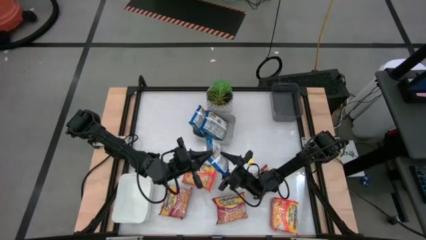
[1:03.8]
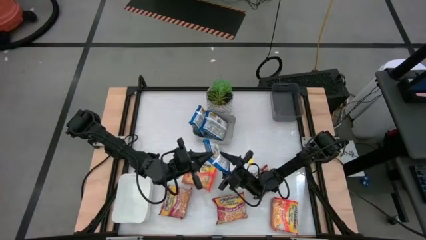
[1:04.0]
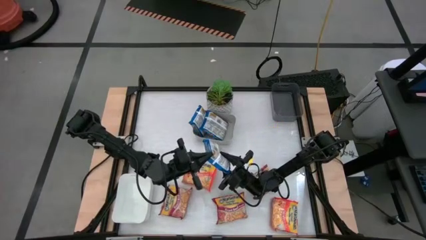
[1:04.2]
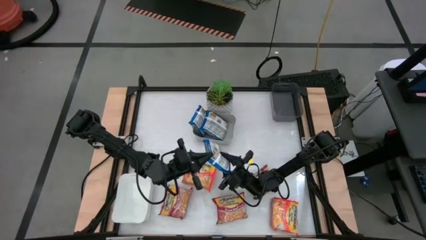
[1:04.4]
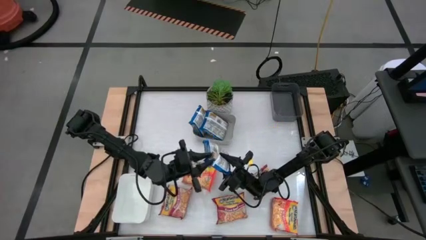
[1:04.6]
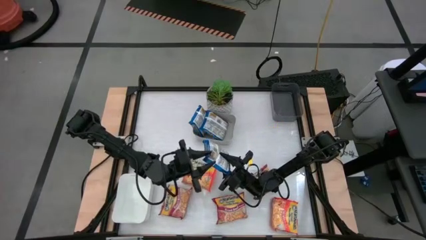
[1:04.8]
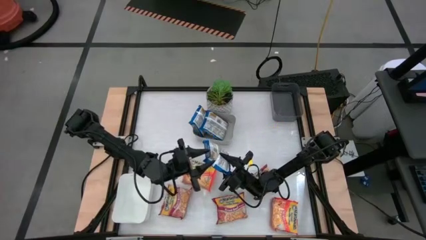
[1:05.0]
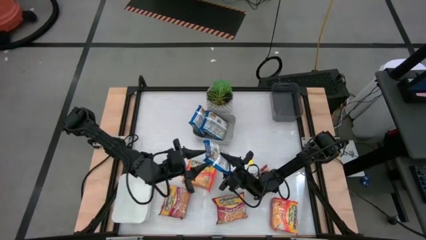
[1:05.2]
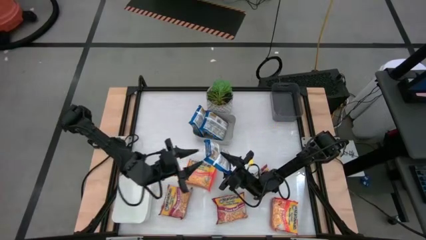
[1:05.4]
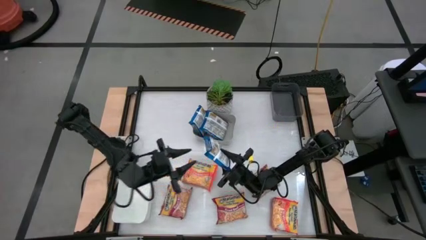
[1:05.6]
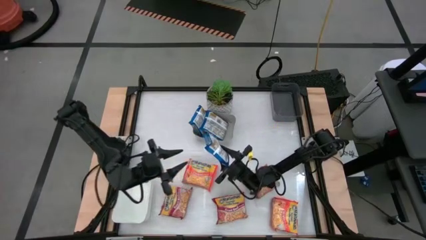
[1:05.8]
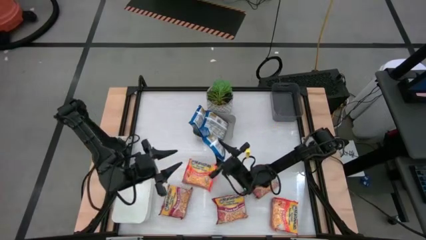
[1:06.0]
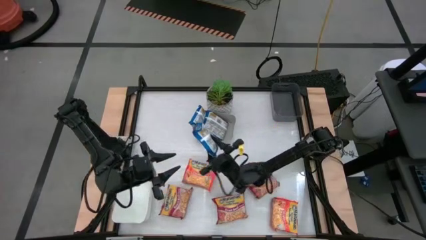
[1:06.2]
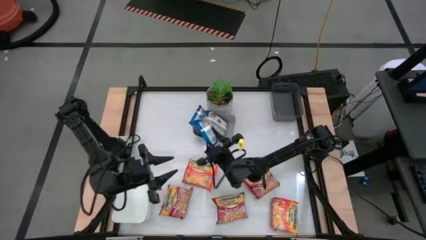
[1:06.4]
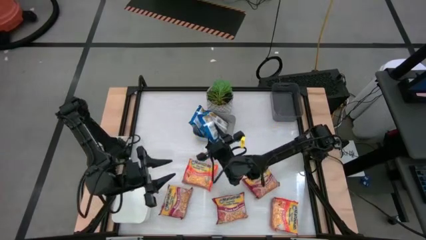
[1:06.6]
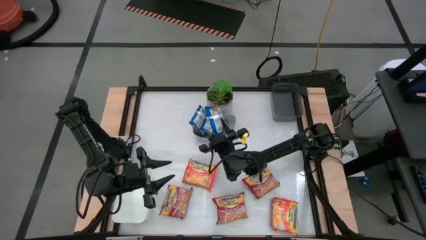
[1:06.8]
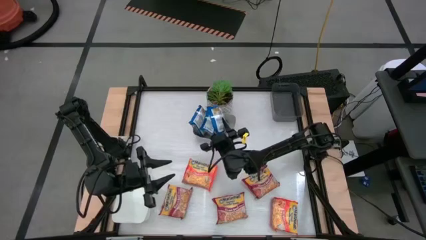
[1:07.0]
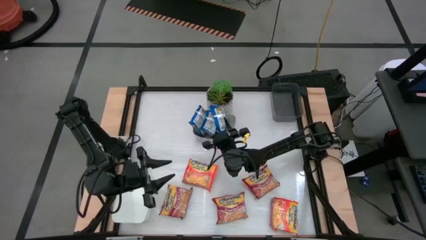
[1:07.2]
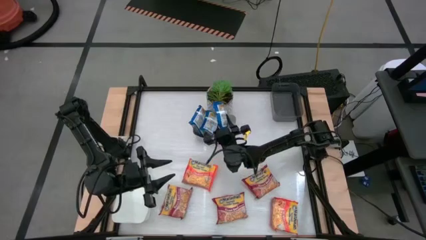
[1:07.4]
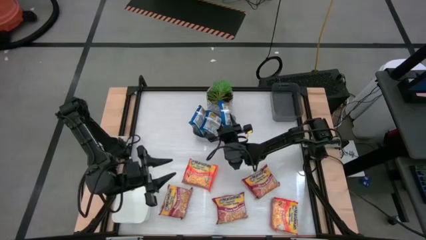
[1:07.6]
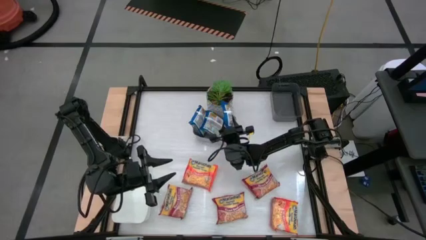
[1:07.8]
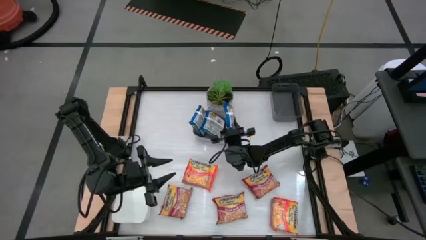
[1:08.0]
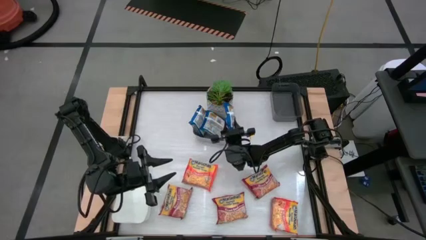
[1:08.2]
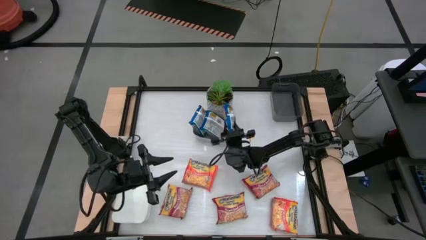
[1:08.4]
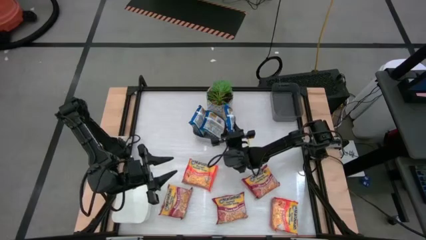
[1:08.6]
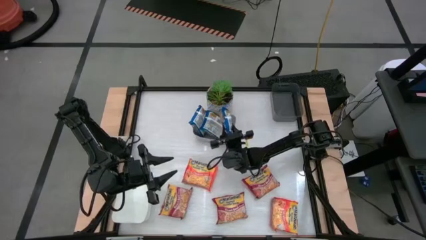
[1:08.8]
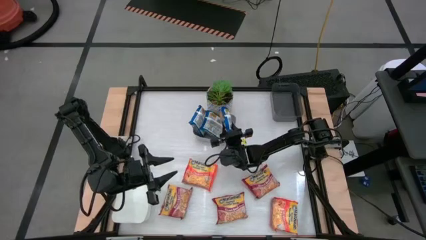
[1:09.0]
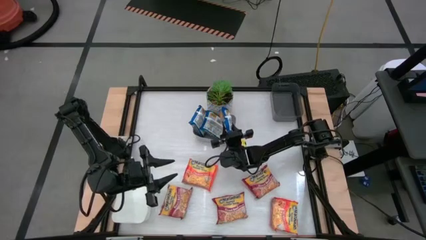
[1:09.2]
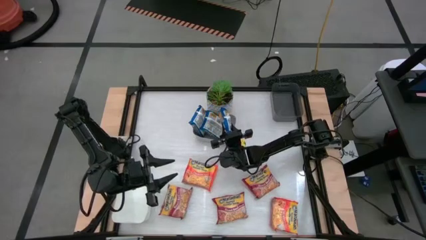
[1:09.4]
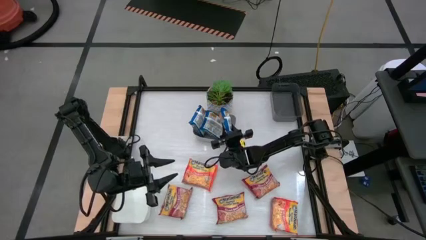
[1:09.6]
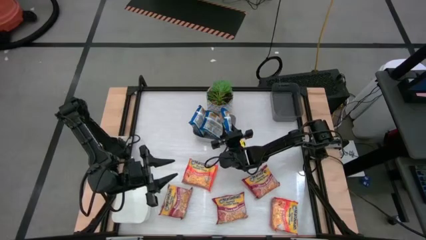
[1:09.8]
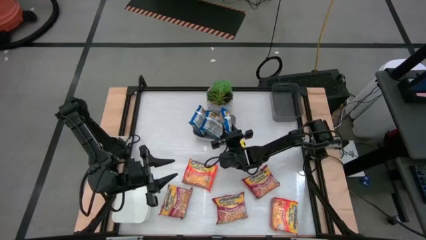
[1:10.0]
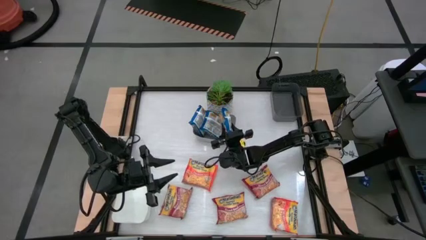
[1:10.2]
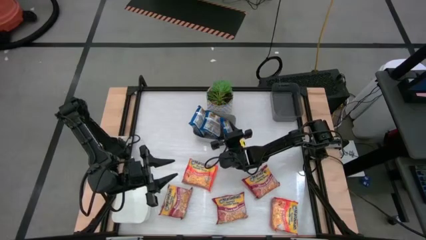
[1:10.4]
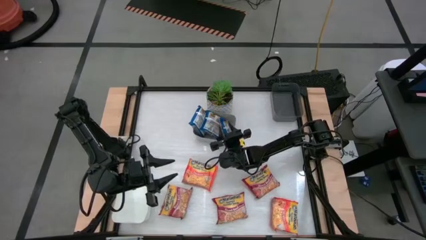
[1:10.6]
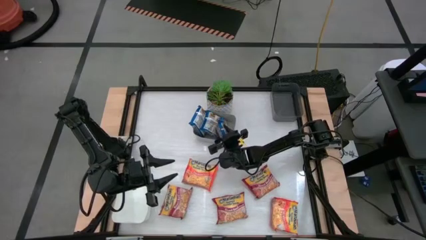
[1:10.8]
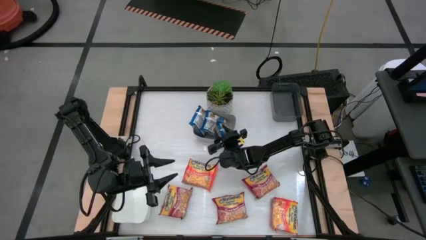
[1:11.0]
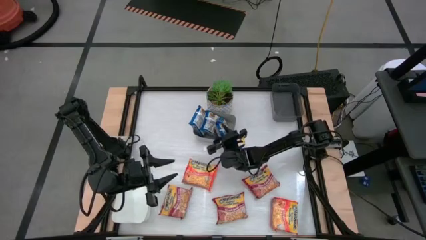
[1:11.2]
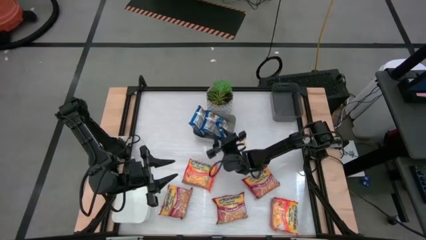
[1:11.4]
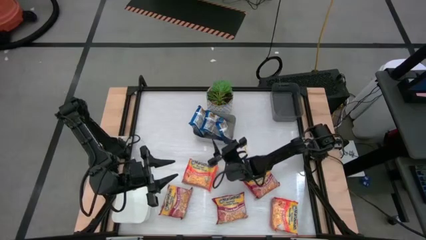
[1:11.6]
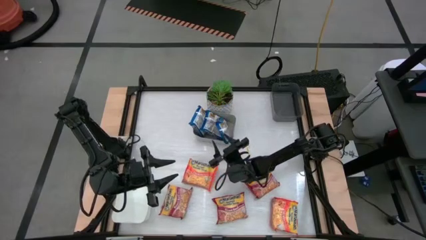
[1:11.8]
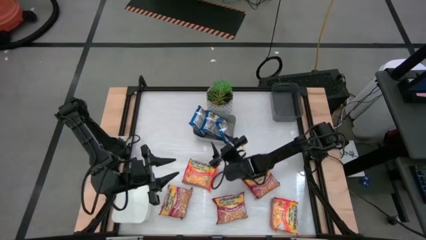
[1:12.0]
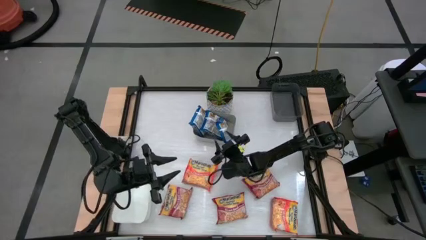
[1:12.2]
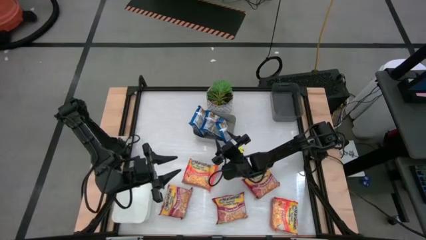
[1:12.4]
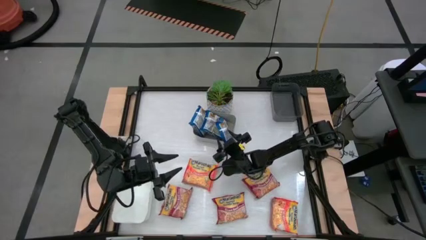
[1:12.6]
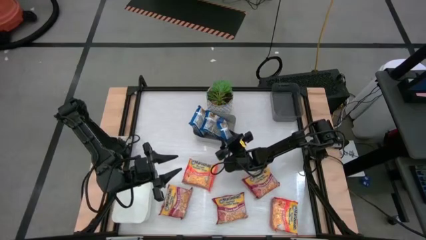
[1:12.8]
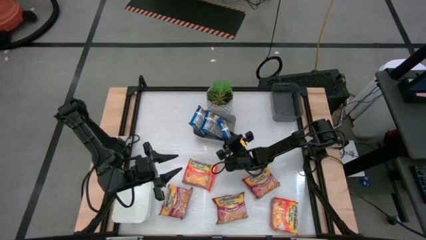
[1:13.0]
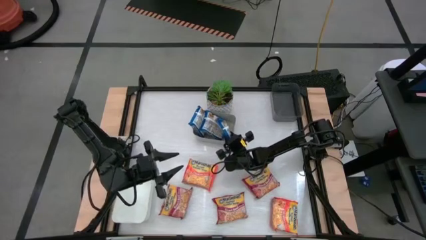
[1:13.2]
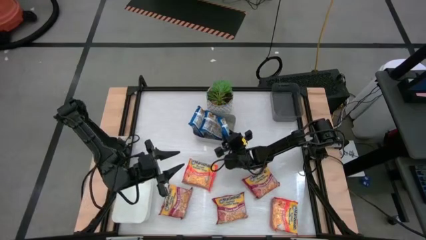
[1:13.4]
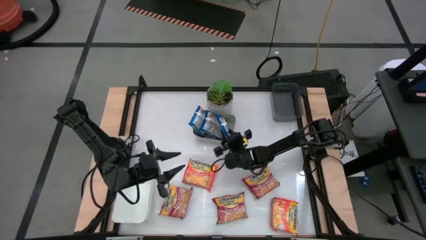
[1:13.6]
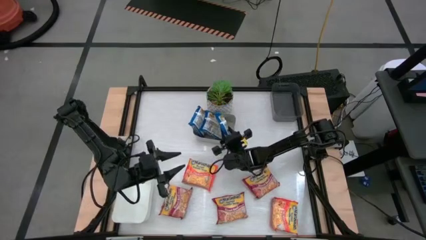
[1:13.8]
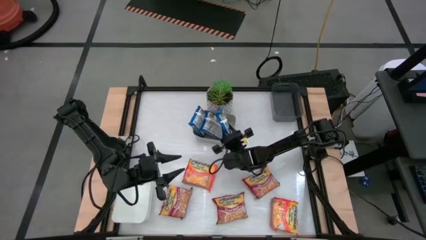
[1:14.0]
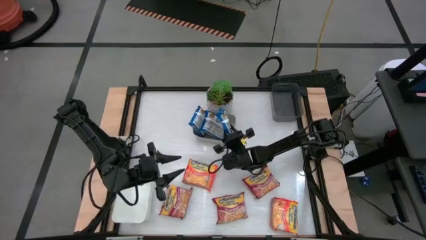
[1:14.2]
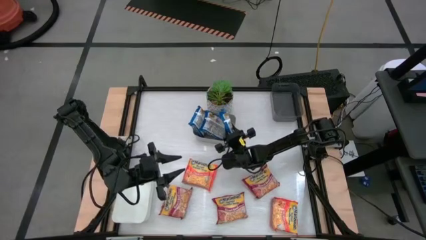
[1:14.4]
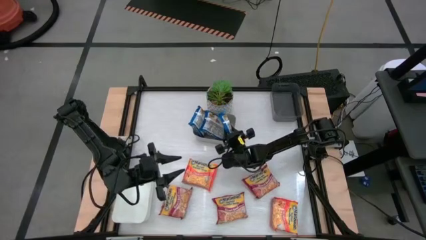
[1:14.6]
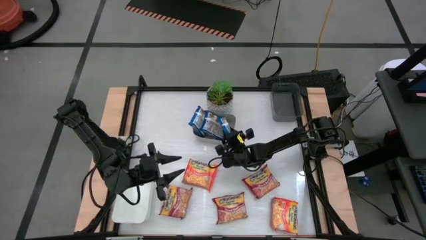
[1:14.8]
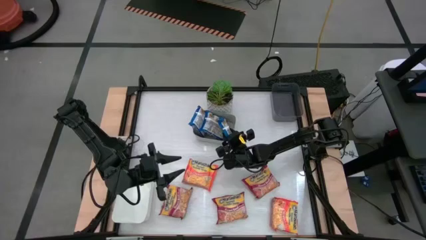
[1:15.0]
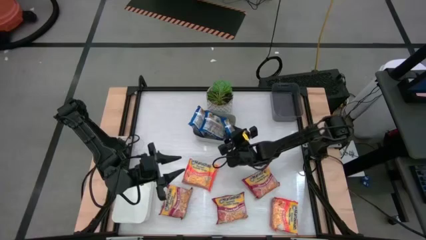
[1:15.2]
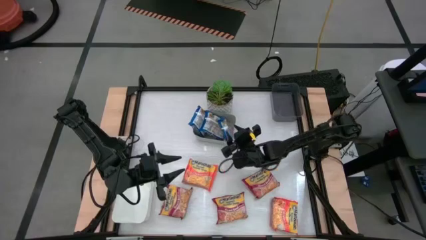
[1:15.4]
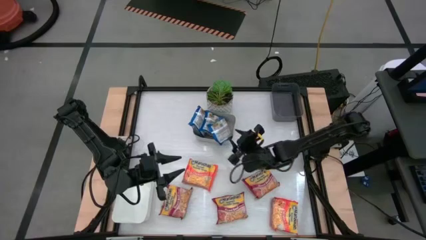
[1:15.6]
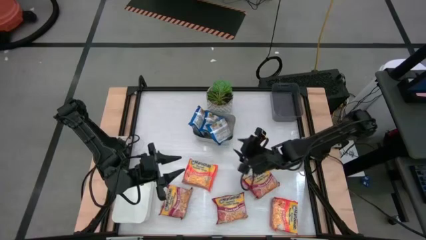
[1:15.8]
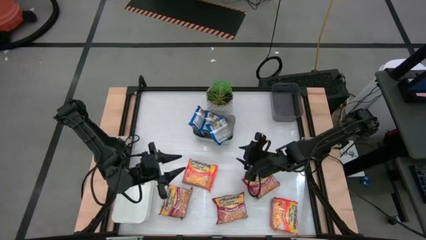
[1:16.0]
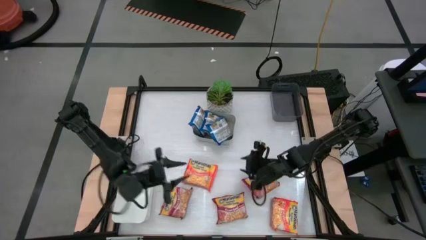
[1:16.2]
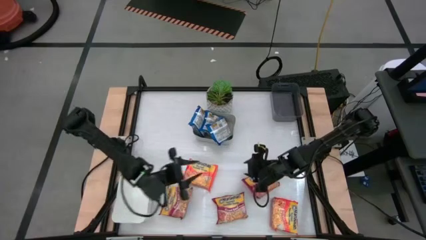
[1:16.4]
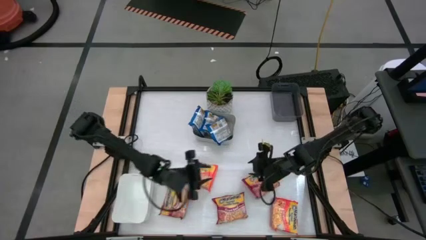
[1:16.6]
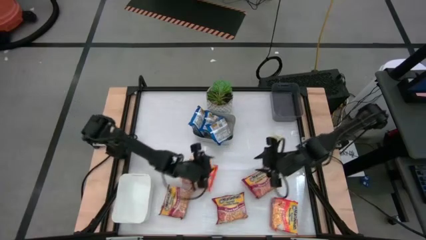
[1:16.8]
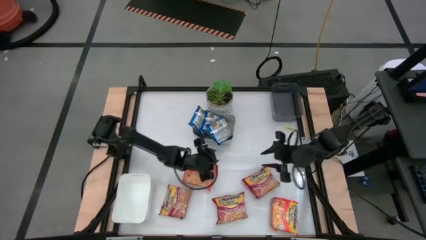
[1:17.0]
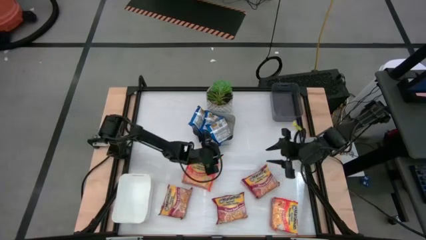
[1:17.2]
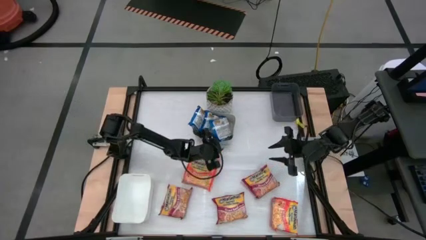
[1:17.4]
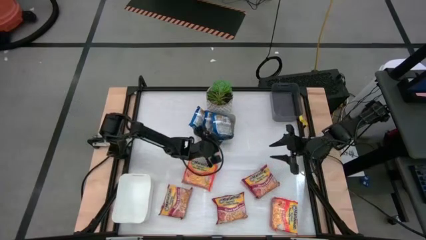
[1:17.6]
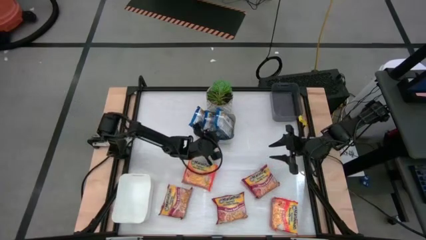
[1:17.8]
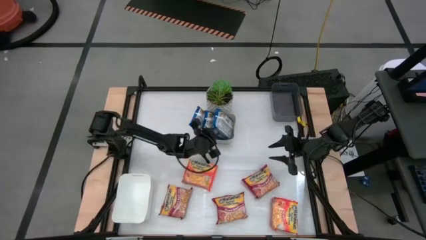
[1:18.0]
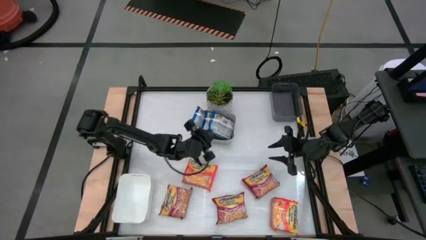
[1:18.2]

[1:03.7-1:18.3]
Task: Sort Maruchan noodles
Put the blue noodle pack into the gray bin
